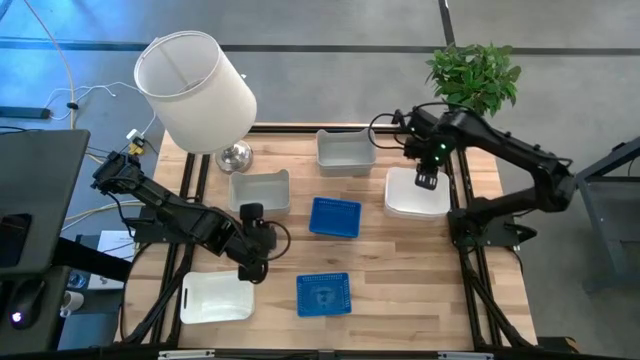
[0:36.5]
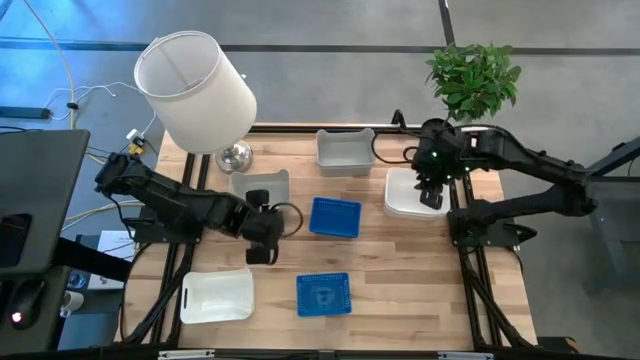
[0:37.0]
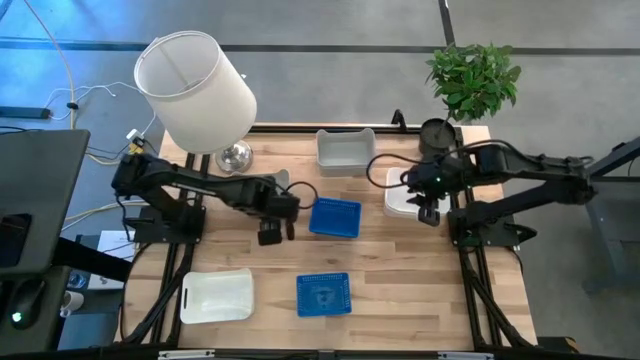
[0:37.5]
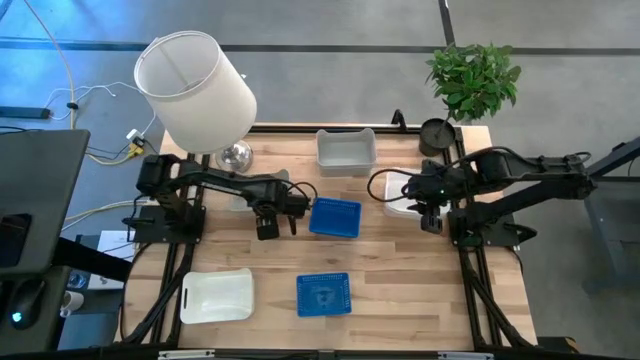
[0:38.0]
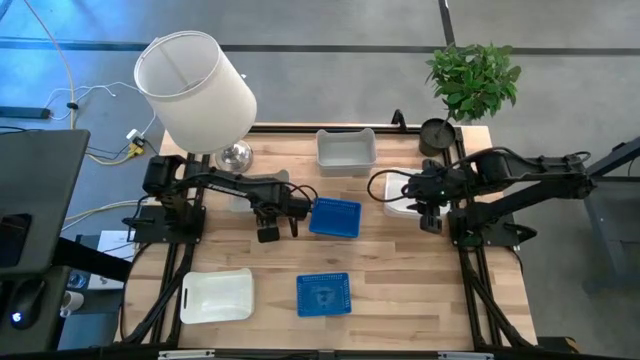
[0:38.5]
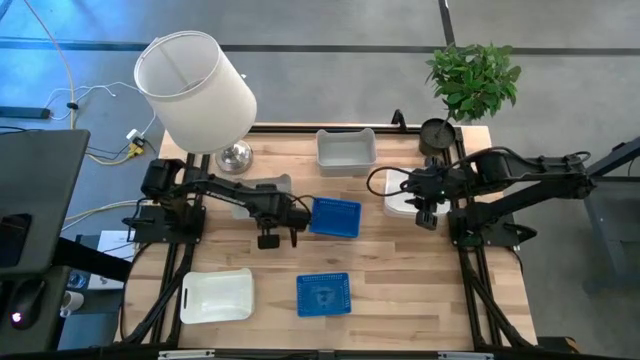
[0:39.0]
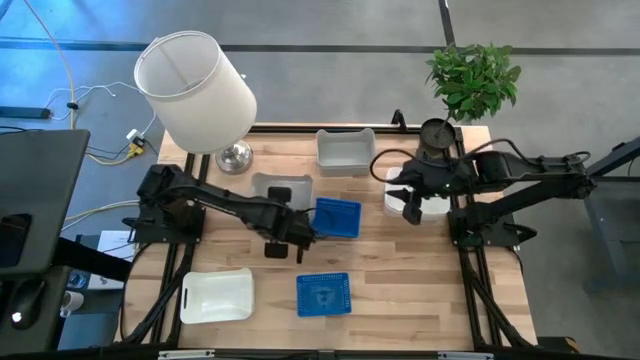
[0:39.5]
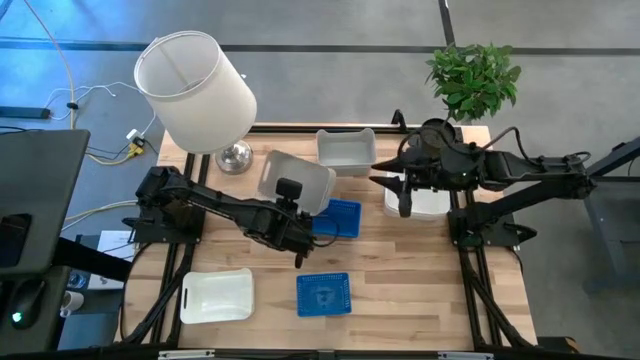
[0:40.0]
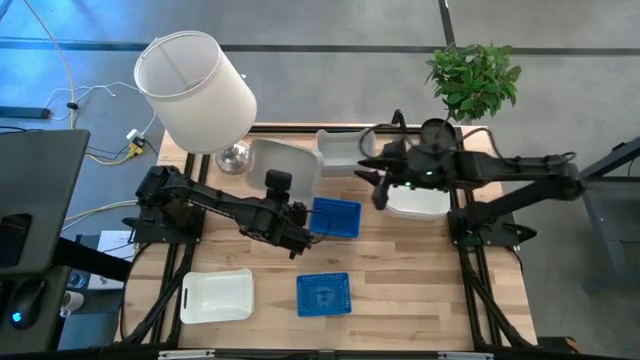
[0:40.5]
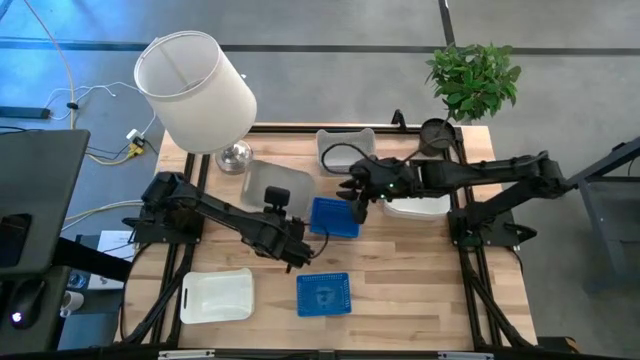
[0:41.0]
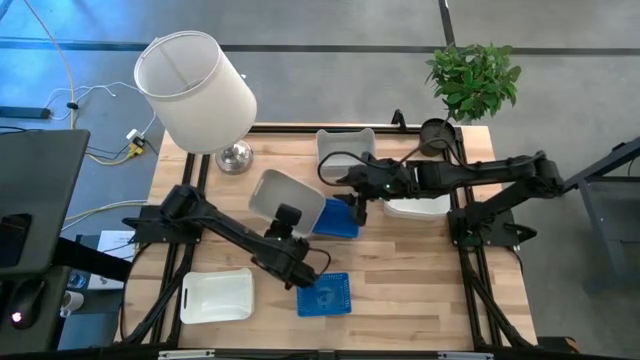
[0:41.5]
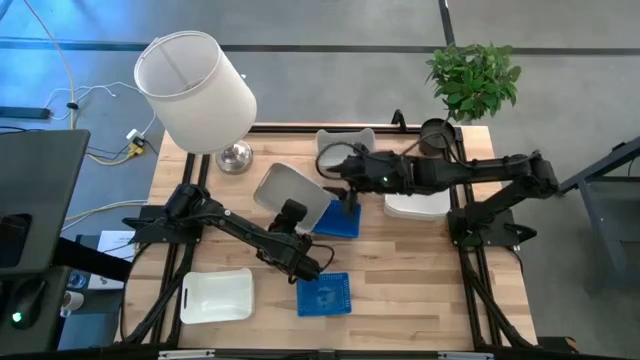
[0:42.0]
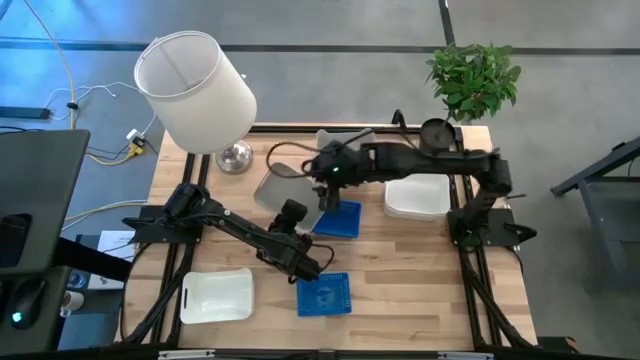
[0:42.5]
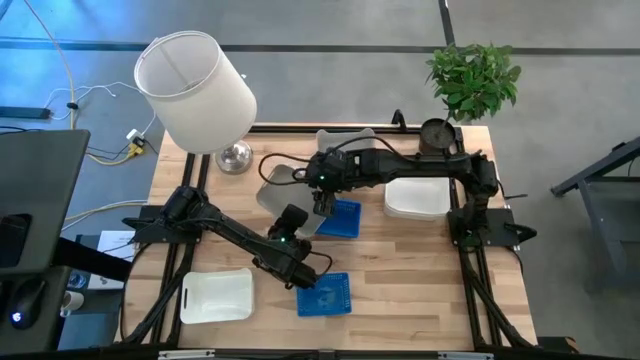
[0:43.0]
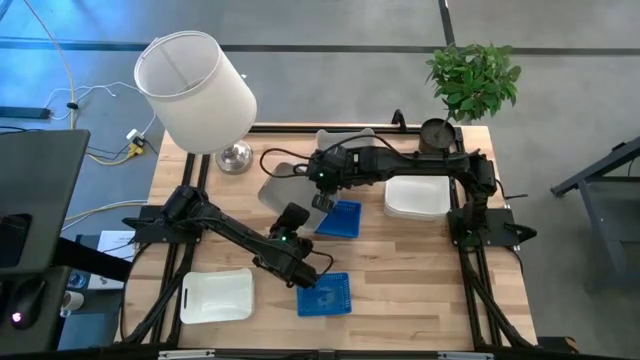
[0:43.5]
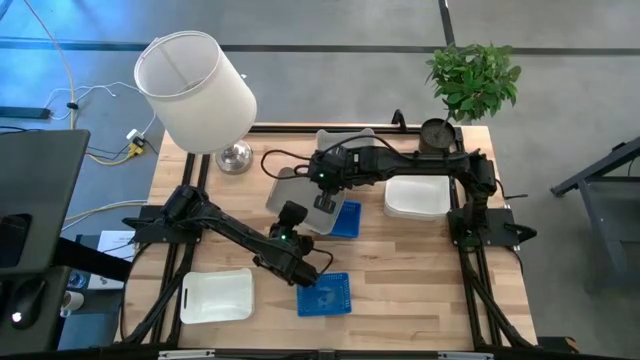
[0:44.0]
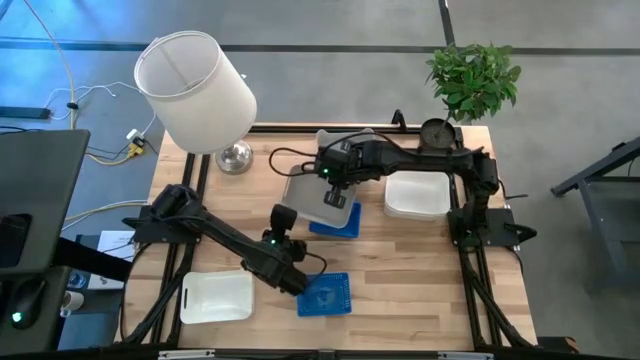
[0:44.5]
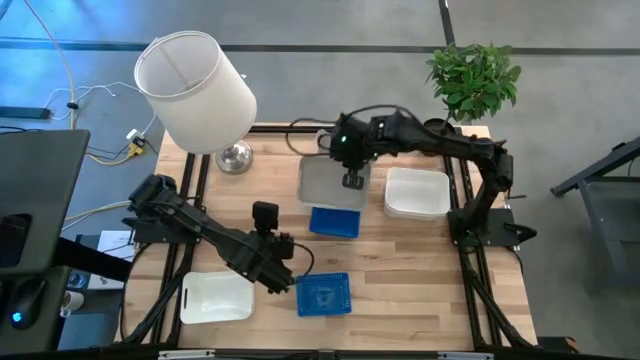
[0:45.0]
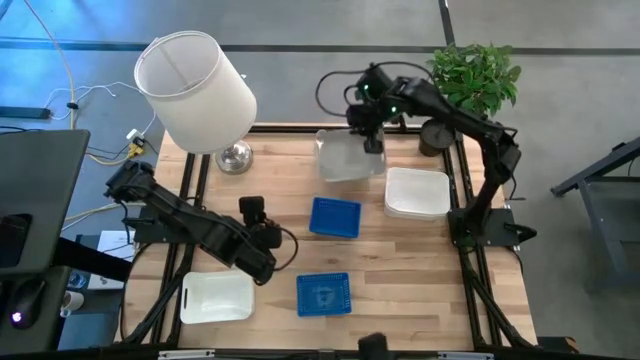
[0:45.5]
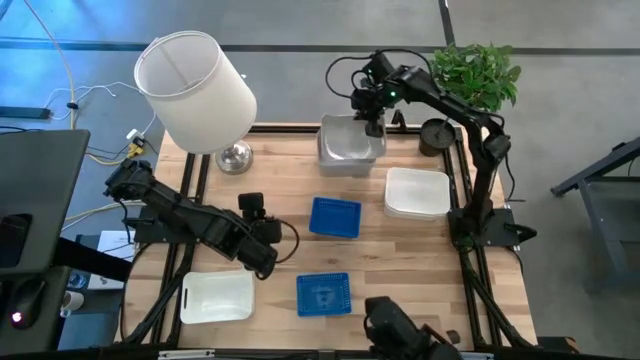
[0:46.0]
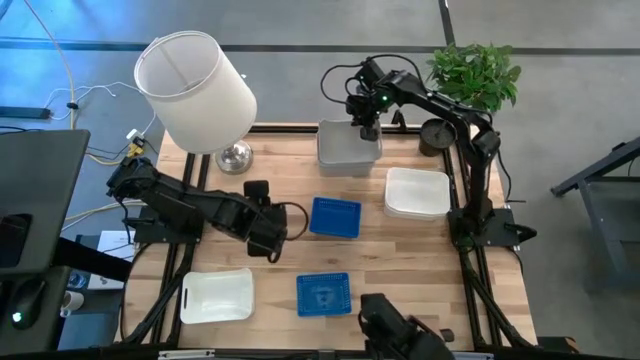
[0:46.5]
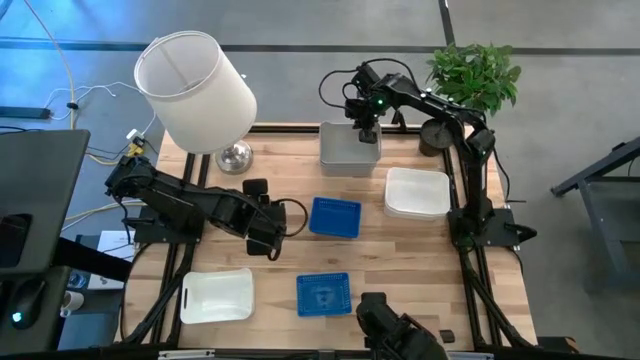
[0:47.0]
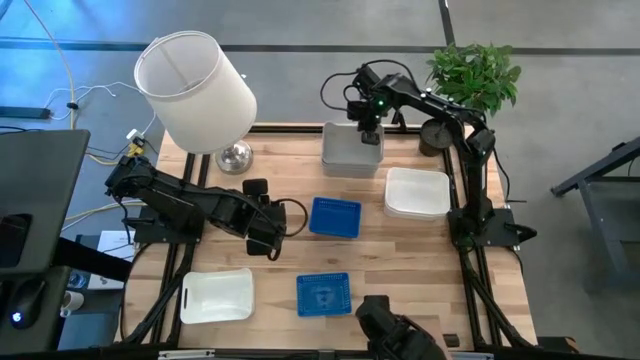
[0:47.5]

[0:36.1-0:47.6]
Stack the bottom gray bin on top of the top gray bins
